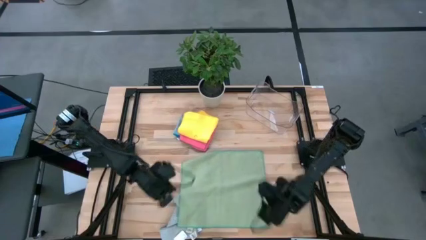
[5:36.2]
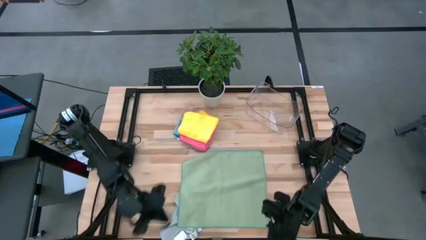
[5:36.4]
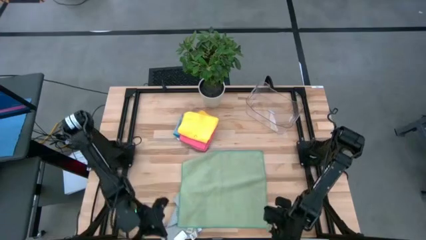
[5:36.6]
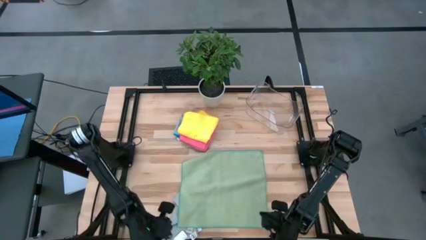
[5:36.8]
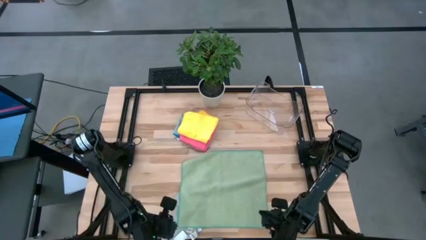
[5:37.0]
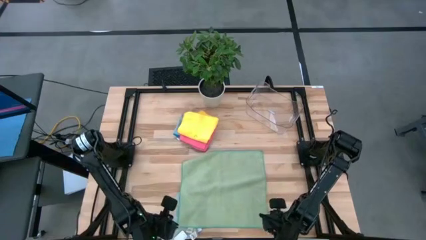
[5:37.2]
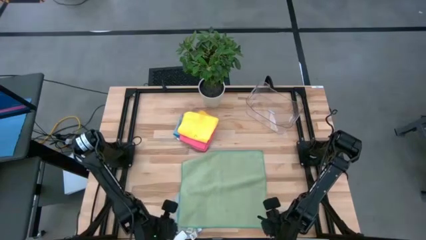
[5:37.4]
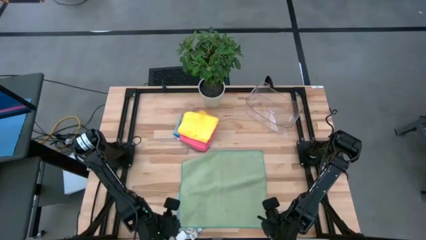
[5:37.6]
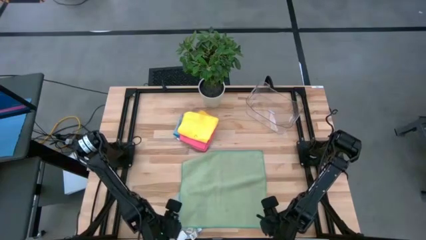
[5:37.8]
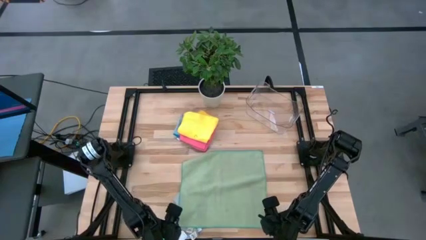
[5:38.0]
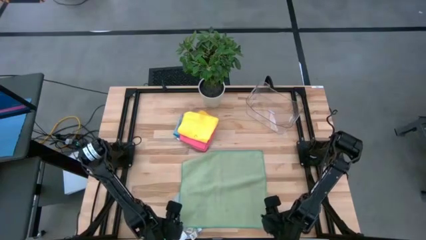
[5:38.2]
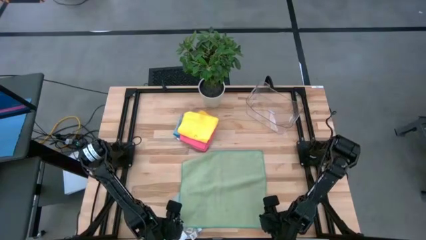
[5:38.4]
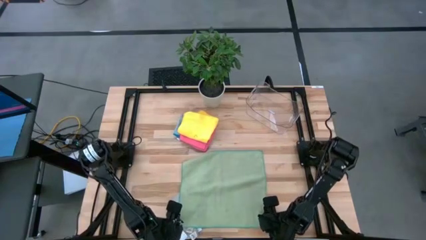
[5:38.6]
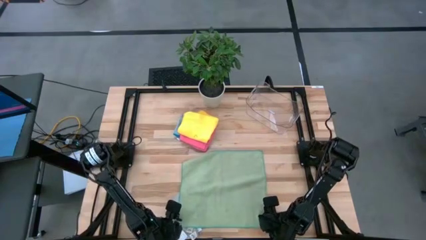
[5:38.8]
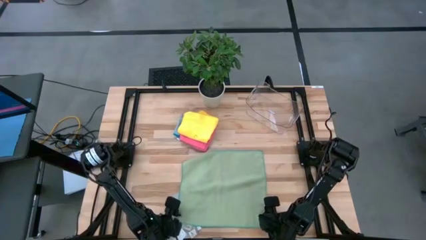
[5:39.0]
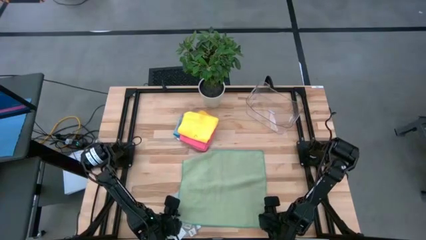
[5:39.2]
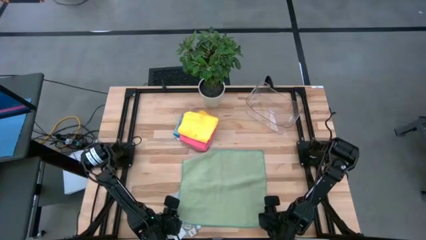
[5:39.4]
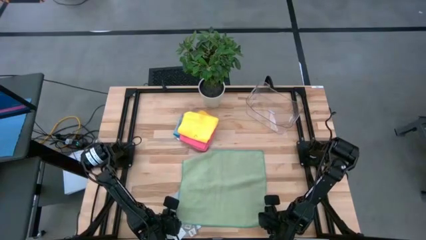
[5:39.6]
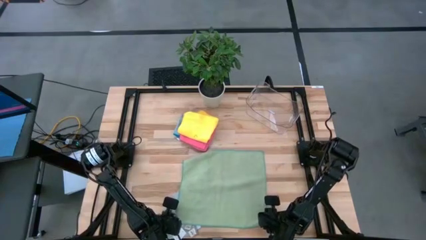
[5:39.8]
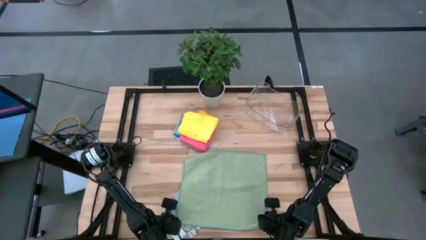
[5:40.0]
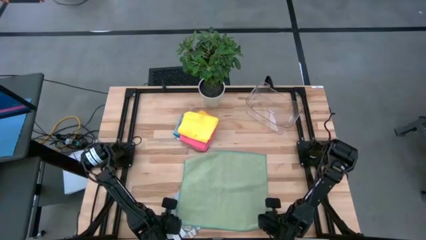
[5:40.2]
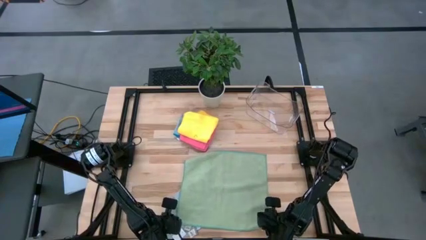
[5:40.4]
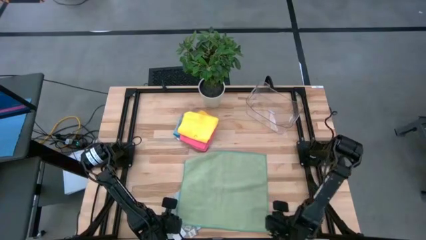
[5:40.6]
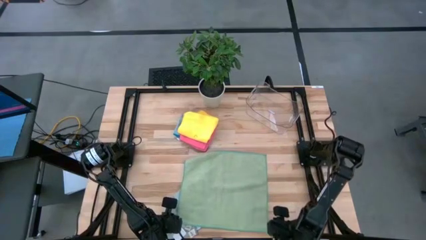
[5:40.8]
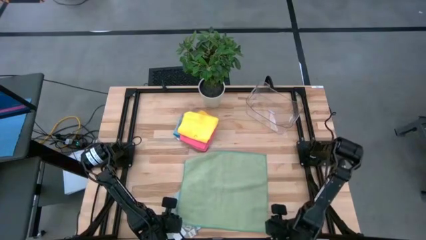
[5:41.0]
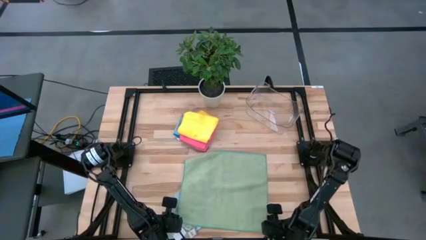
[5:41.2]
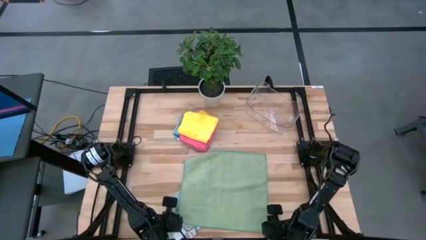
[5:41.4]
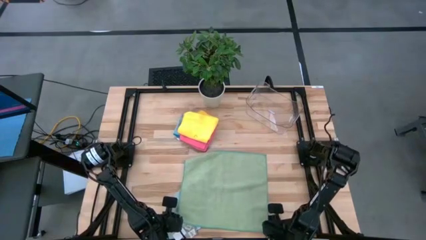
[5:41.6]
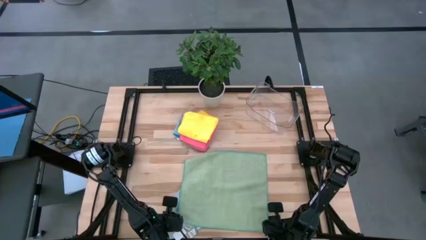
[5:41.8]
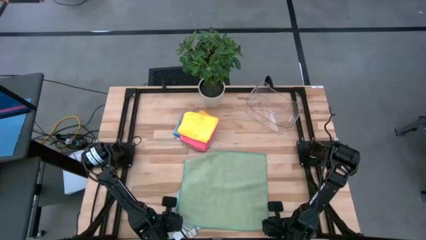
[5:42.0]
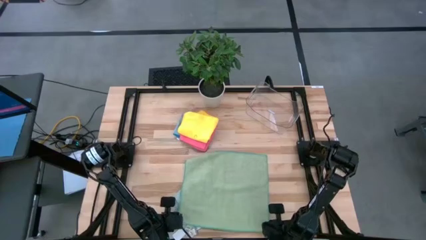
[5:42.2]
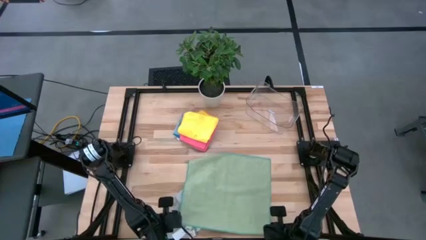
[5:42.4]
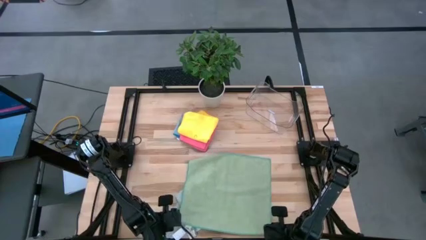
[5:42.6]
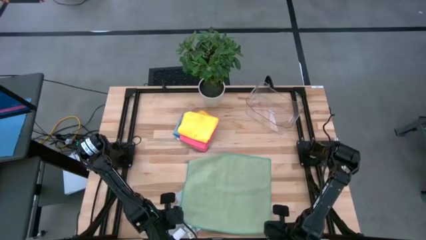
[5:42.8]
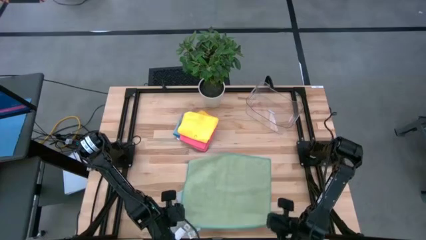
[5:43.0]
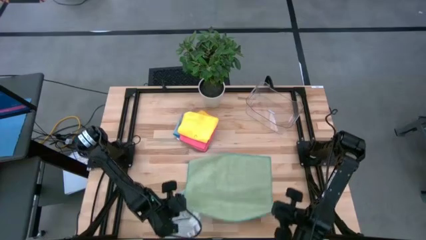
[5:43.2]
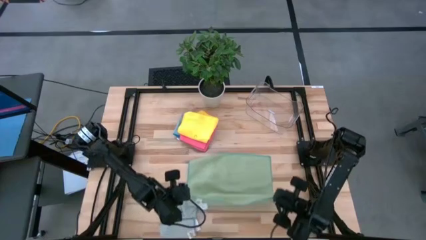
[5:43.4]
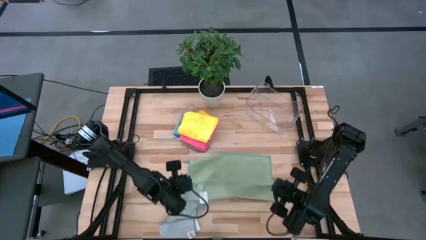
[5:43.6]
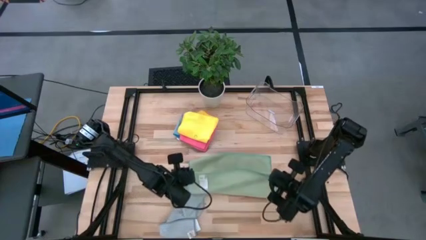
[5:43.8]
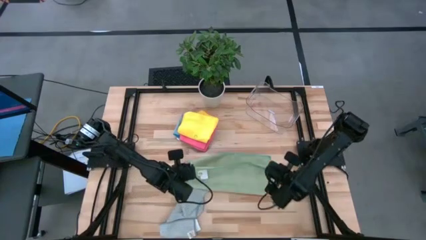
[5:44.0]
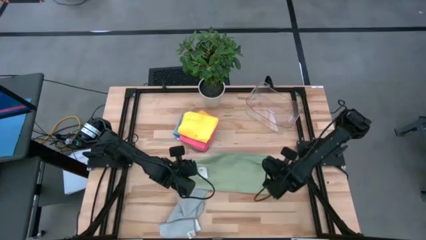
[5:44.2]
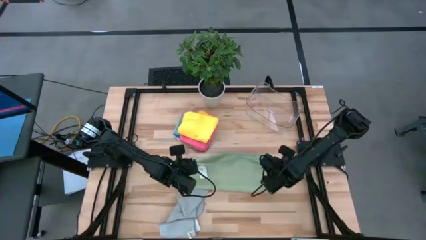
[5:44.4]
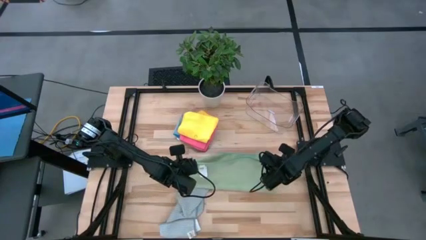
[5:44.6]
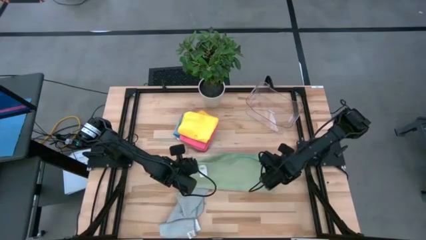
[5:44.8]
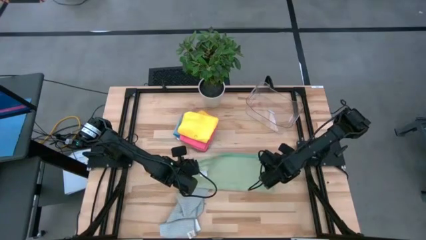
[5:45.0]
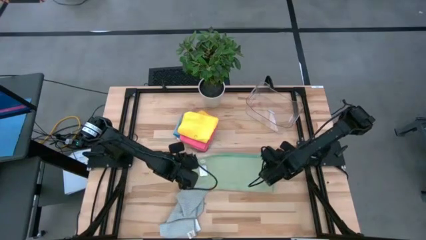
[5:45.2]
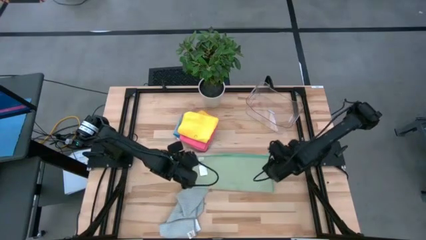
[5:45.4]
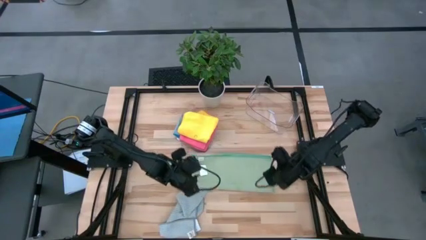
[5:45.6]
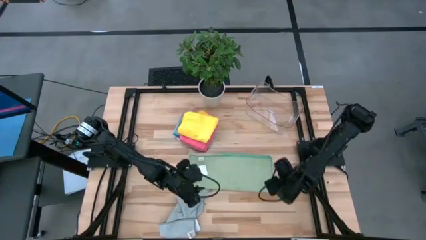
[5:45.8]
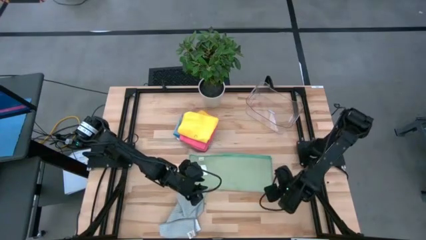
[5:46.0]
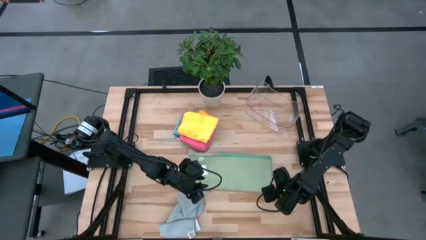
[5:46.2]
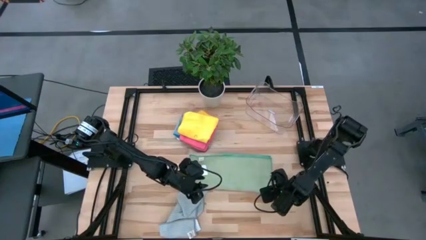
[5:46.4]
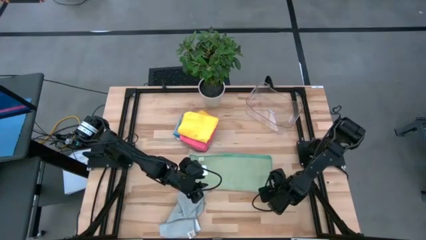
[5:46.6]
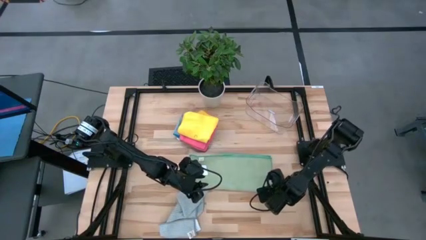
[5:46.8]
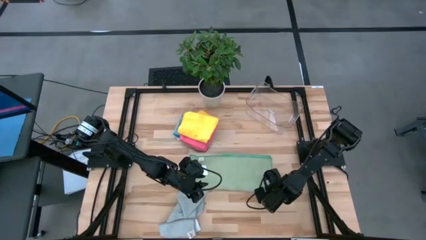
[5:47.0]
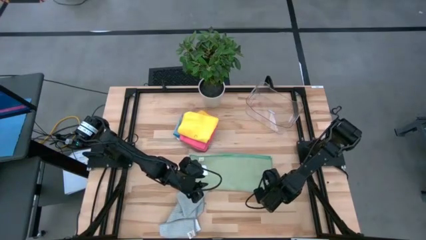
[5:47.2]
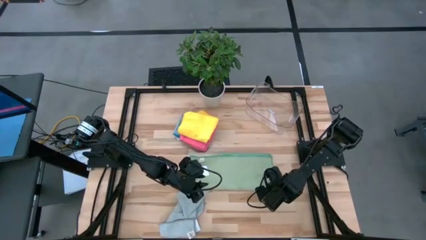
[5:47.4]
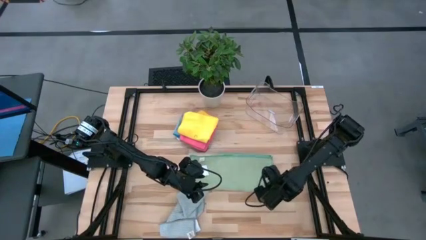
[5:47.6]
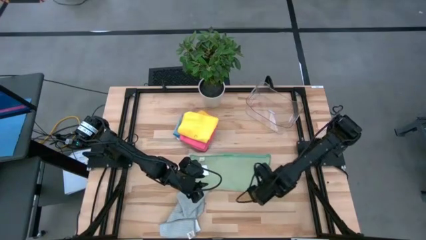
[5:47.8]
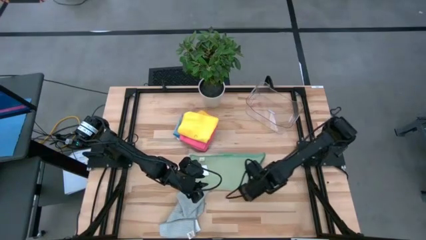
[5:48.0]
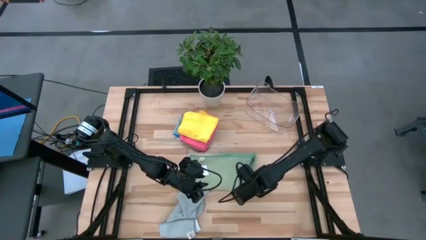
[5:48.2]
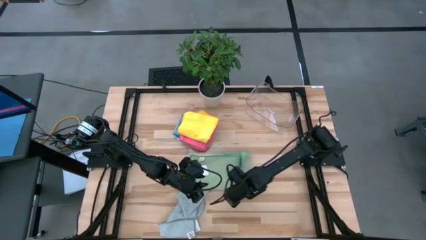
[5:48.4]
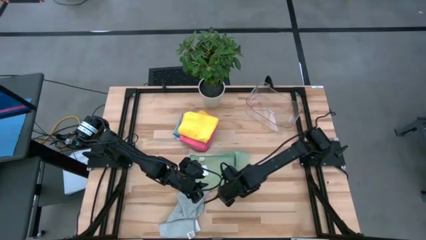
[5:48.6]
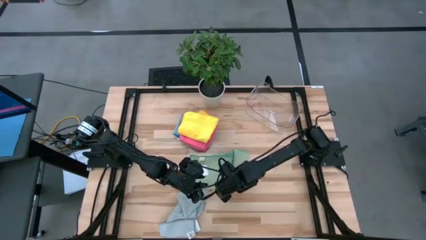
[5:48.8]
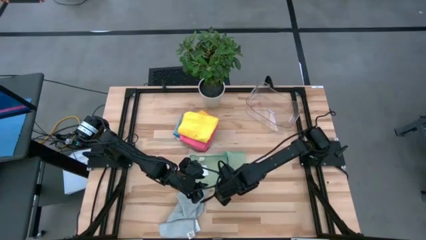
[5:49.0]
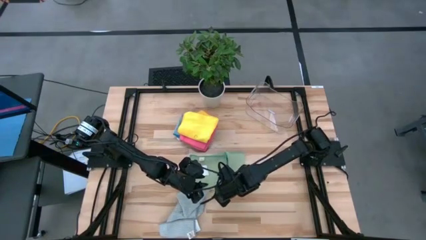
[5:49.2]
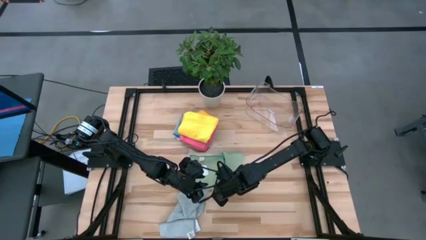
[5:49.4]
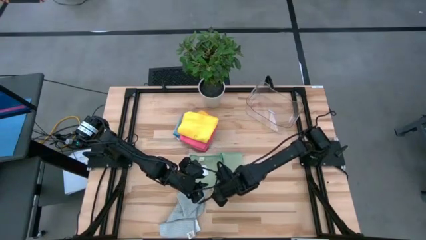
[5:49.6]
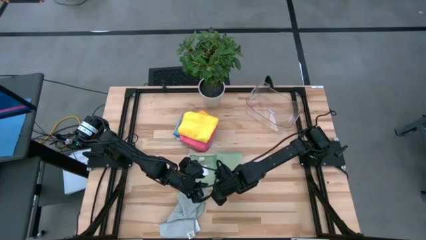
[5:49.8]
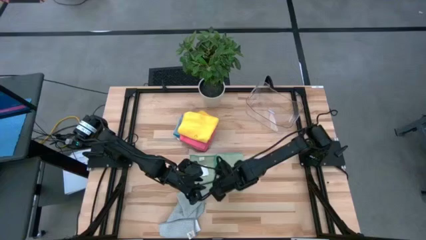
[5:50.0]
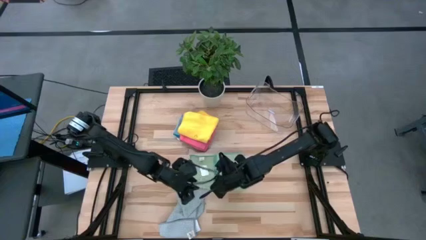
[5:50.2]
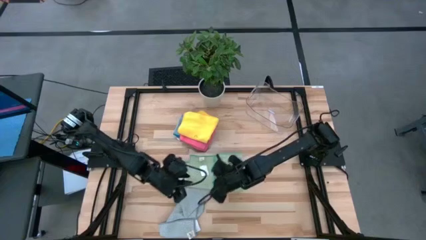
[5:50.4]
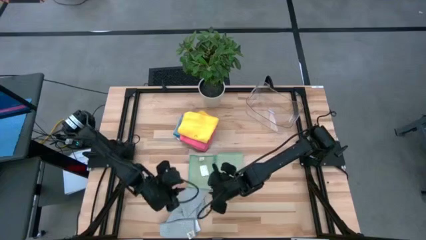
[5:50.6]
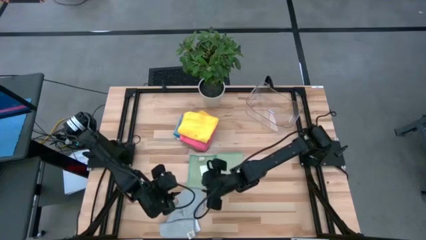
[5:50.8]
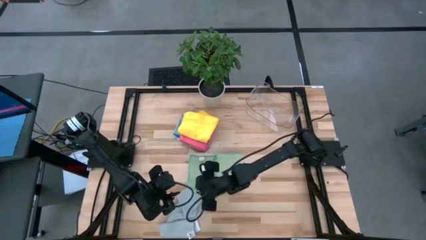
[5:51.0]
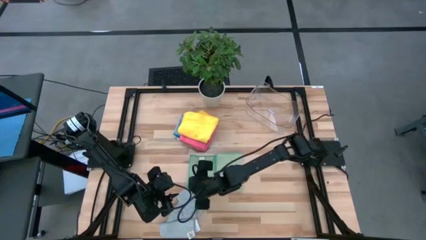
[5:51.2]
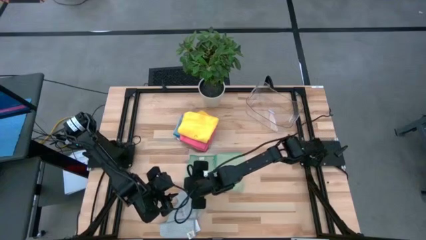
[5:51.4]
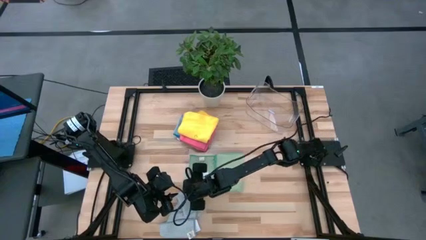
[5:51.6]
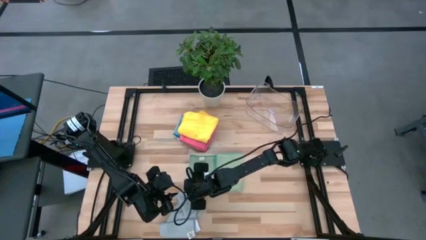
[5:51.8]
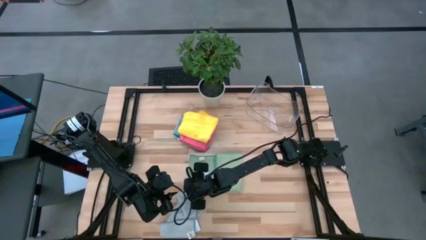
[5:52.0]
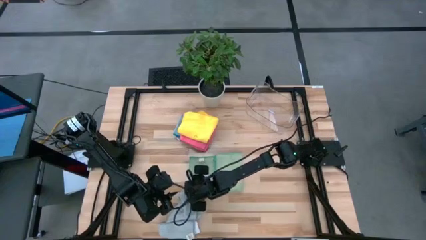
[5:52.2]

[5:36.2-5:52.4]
Task: Fold microfiber towels
Fold the light green microfiber towel
